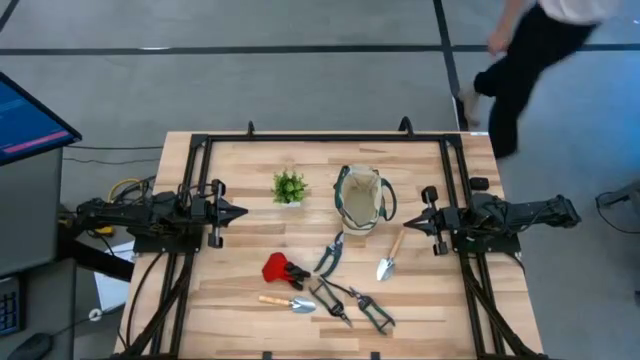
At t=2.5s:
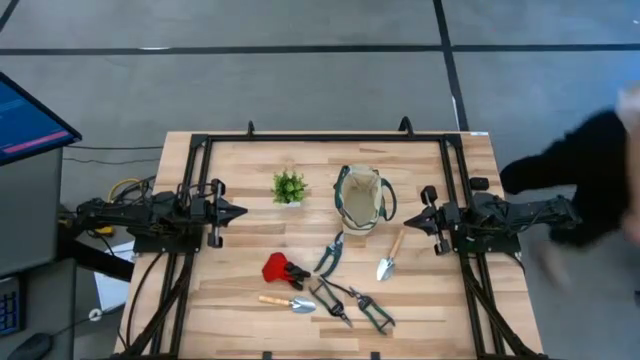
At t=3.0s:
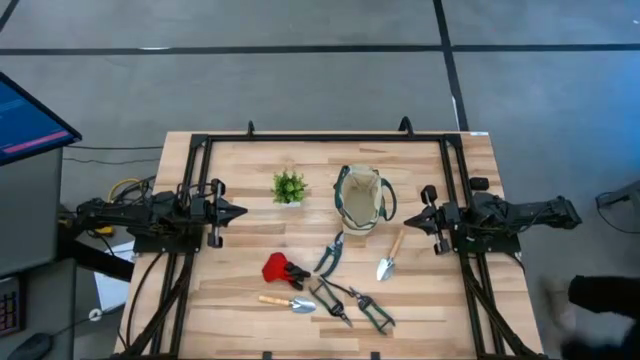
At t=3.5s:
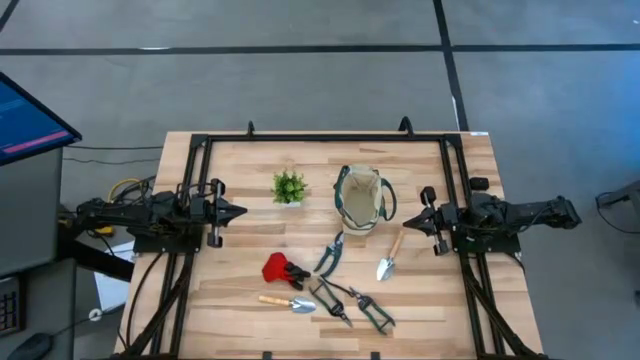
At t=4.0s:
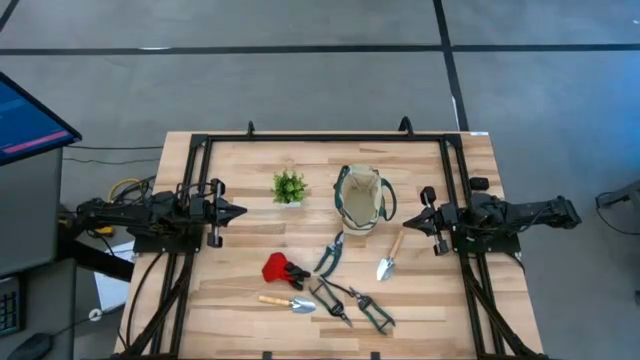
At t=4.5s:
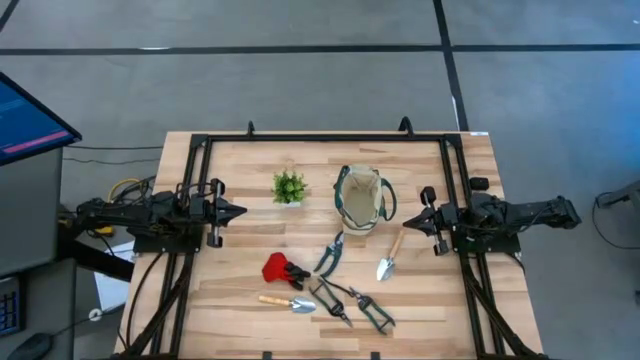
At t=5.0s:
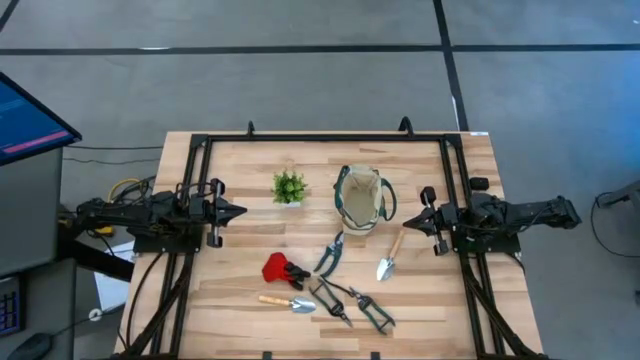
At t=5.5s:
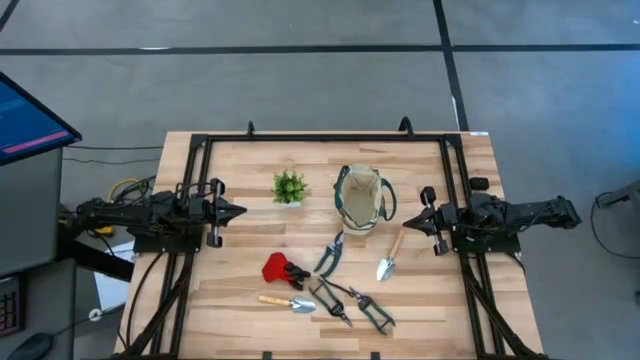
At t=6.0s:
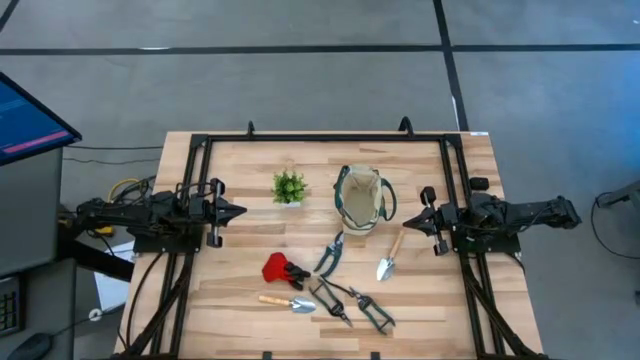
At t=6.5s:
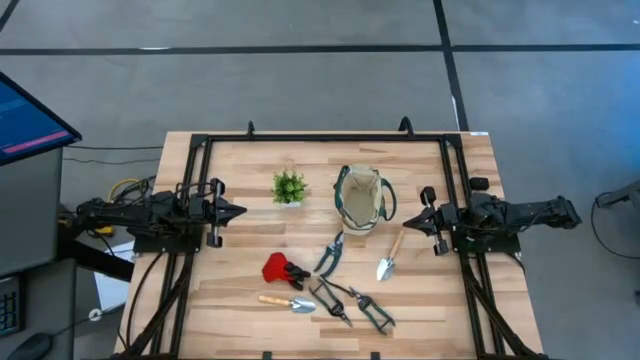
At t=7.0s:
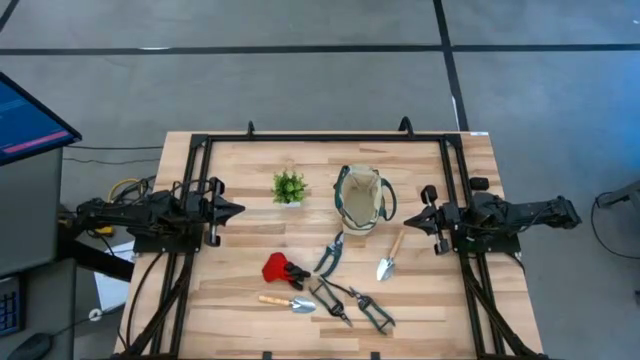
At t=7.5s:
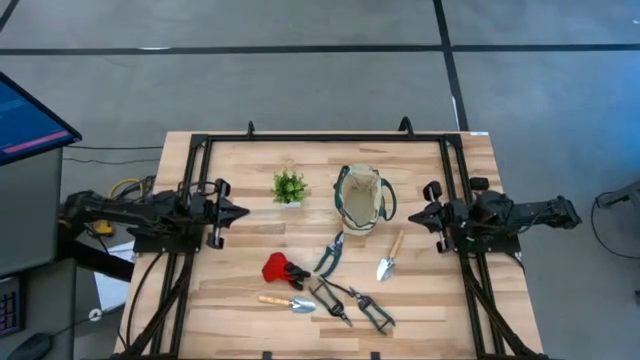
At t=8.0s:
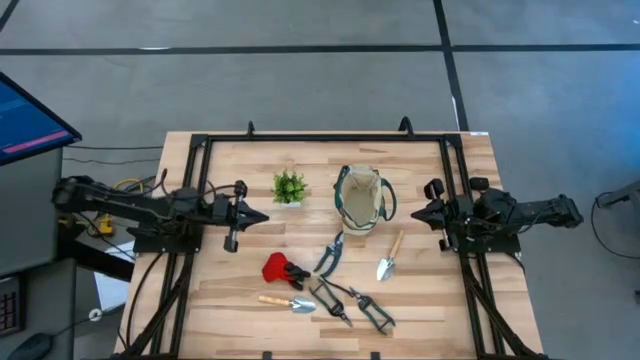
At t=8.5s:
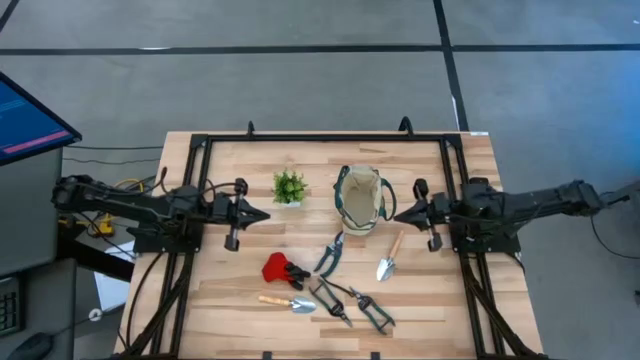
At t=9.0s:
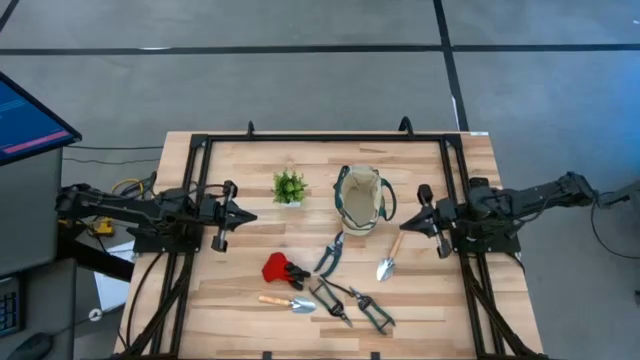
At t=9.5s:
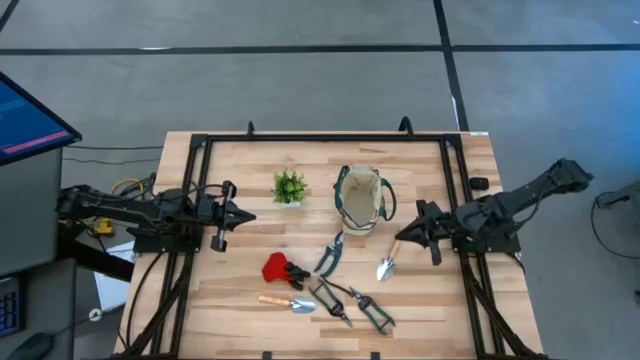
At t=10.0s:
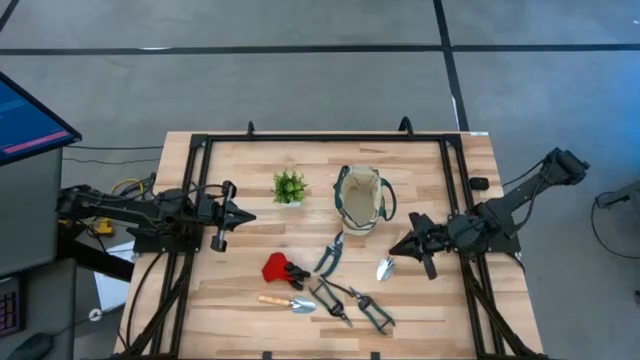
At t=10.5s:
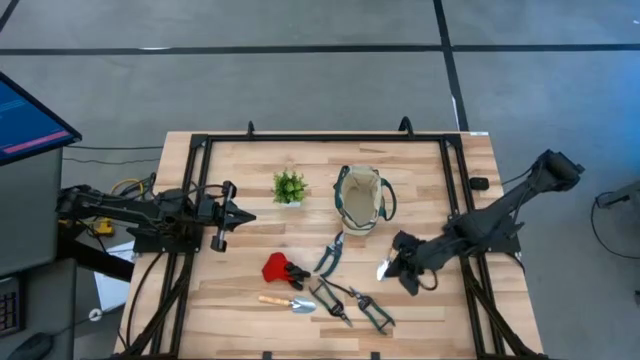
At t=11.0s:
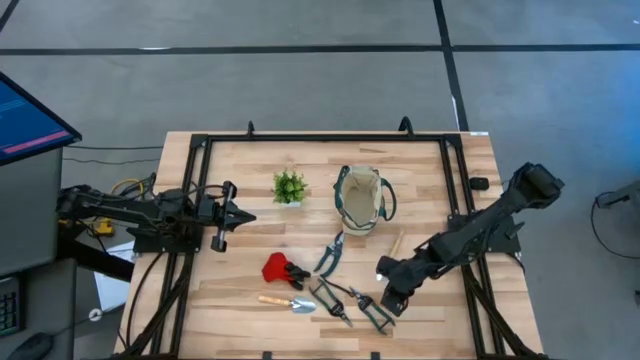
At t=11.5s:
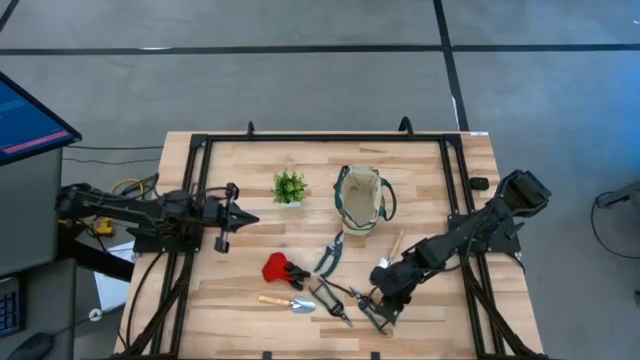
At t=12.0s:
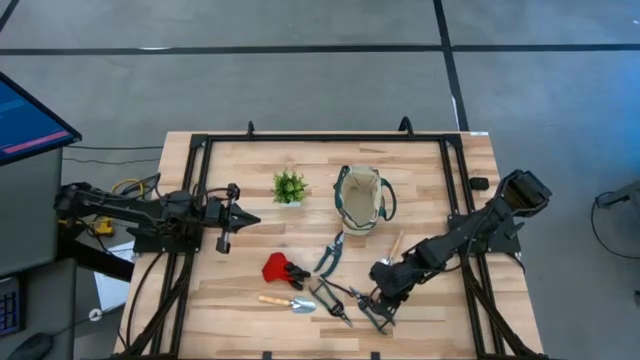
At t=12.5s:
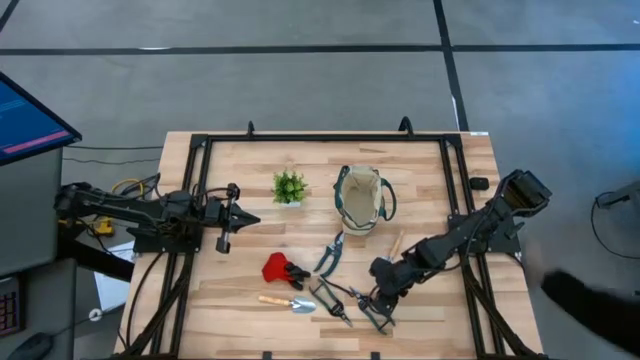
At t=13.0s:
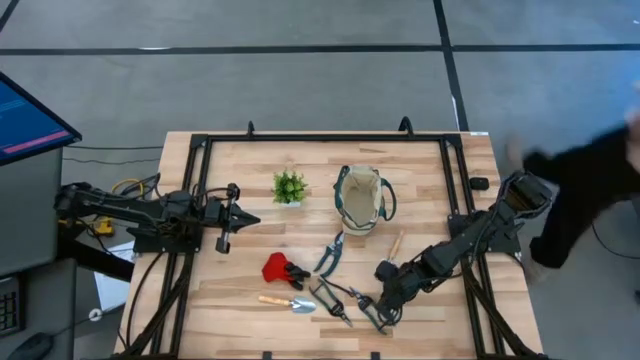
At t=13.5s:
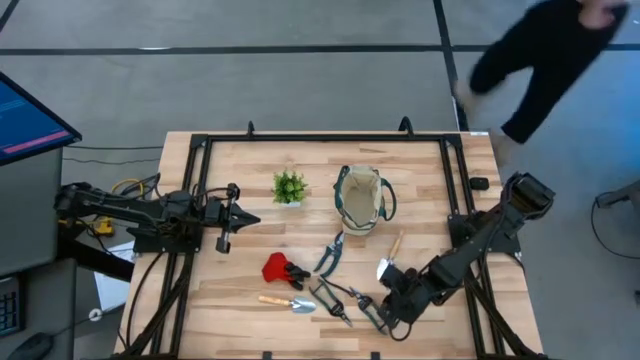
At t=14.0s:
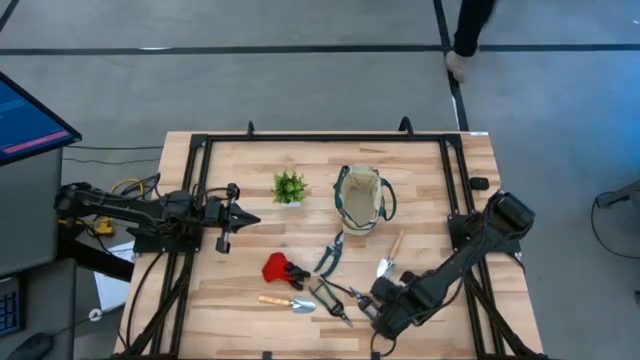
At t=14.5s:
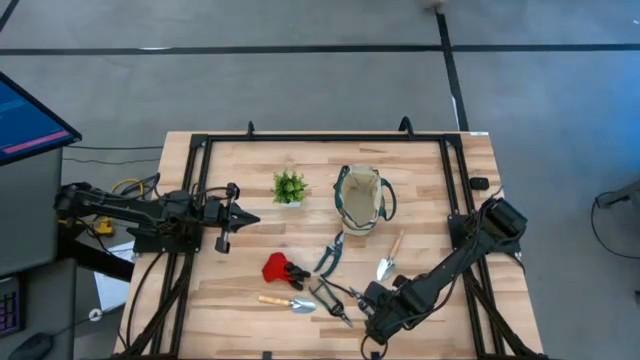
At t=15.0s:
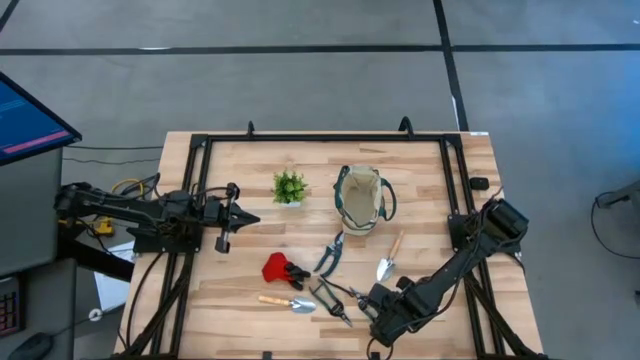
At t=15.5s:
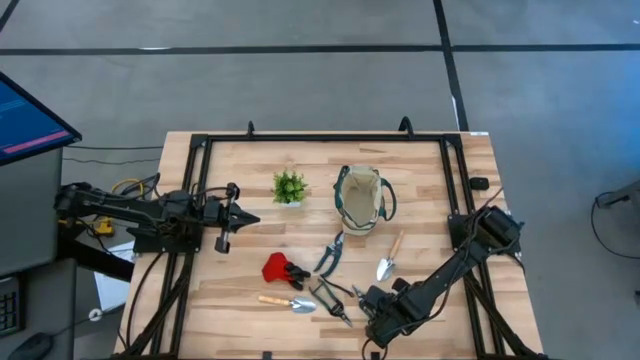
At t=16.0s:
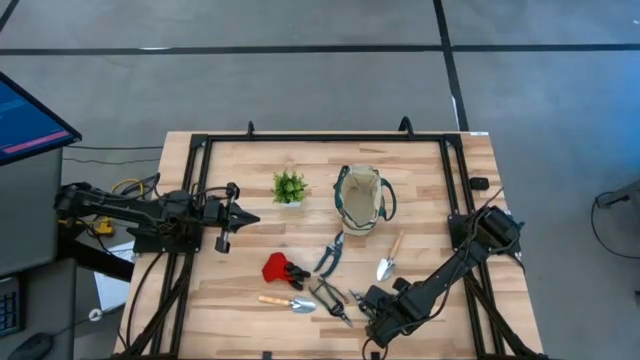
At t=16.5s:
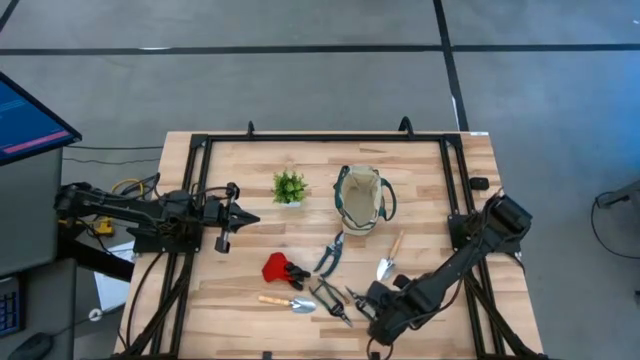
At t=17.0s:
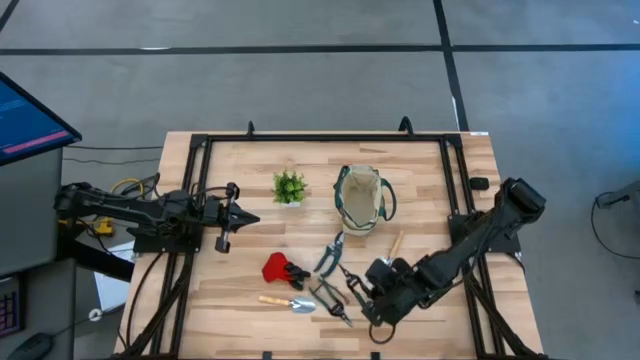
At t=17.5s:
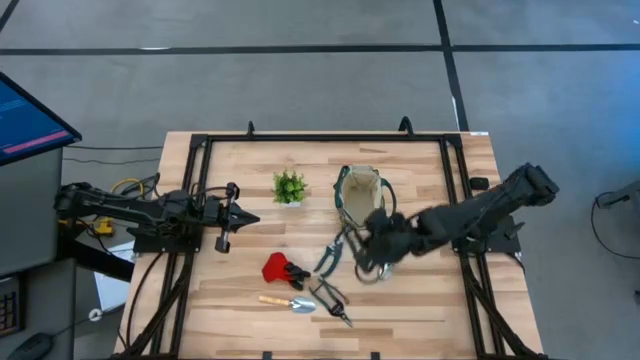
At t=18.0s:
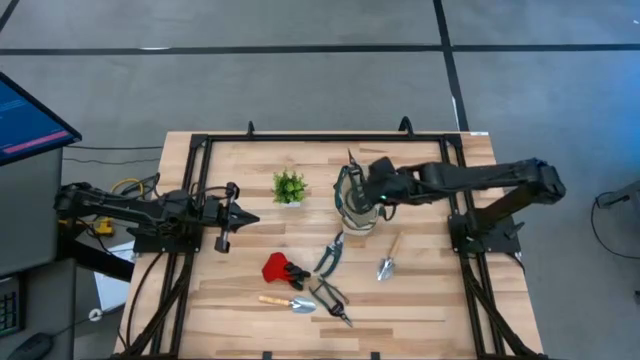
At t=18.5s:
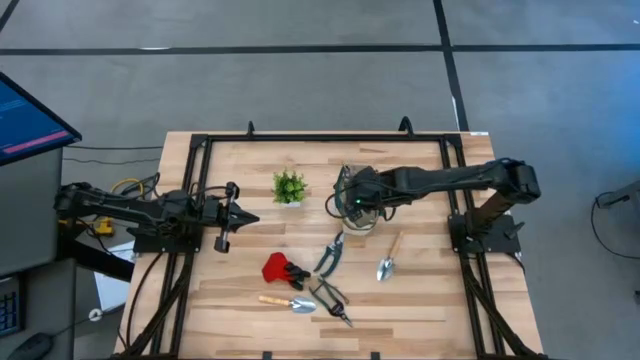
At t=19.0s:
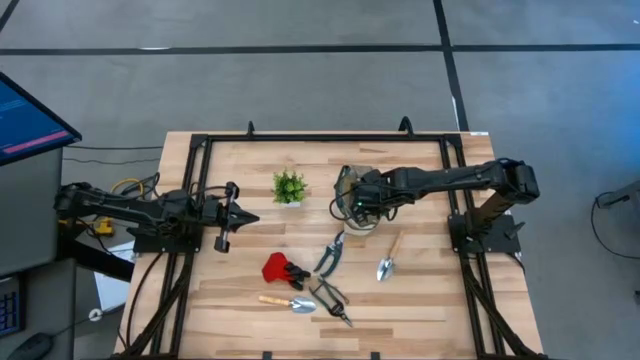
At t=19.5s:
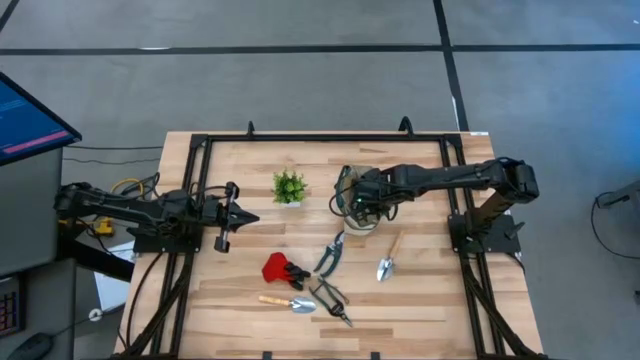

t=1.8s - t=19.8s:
Task: Pick & Place Garden tools in Gardening bag
Put the right green fruit pruner into the white gardening bag

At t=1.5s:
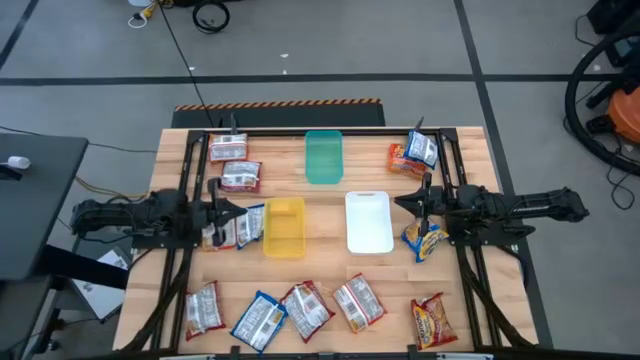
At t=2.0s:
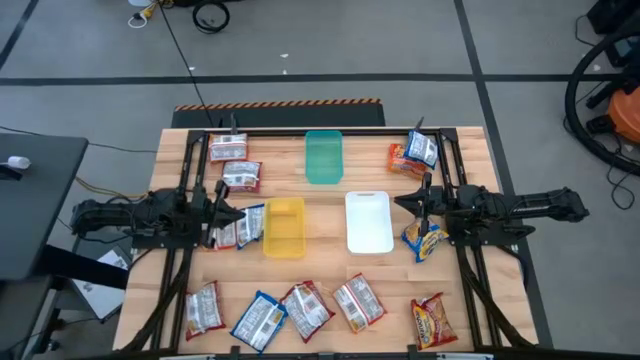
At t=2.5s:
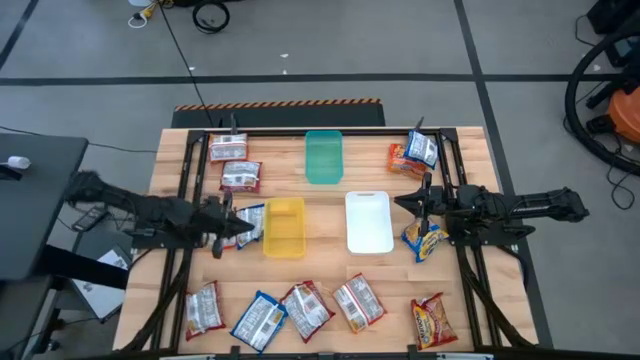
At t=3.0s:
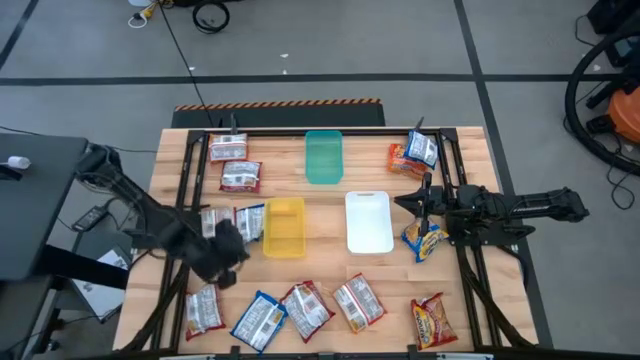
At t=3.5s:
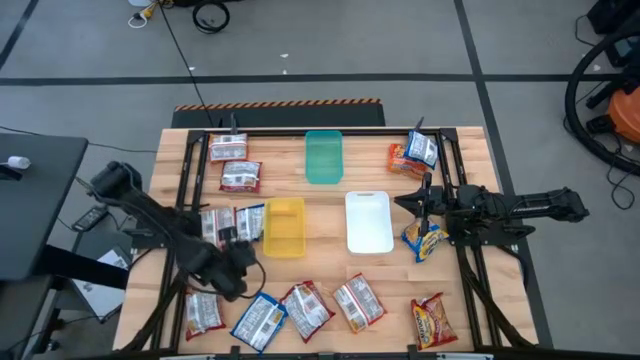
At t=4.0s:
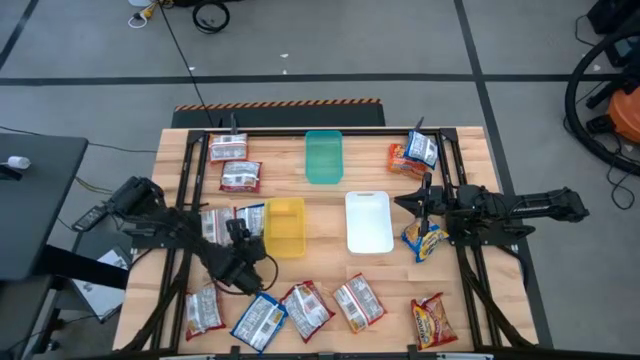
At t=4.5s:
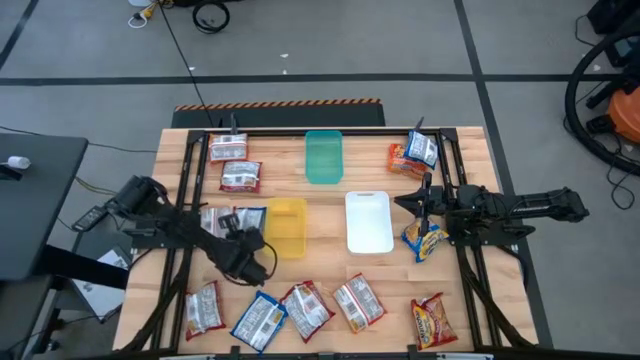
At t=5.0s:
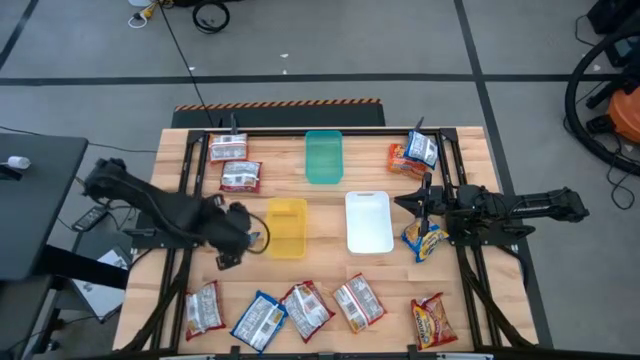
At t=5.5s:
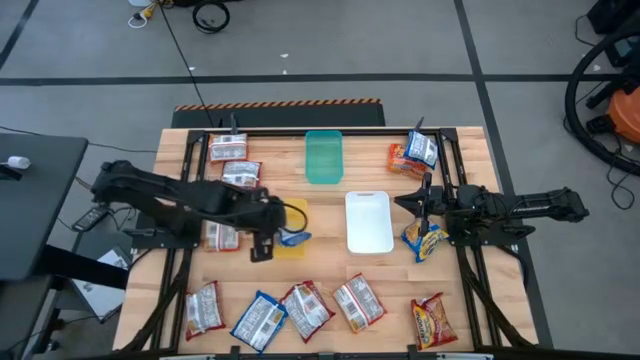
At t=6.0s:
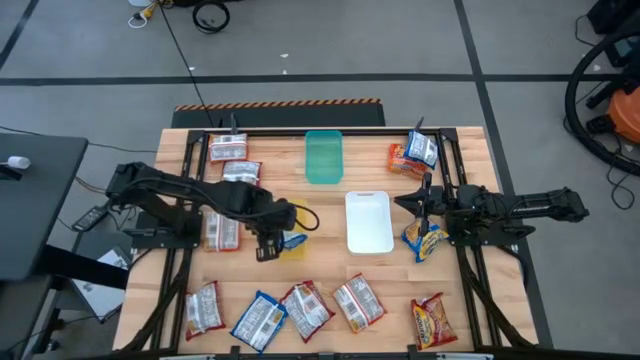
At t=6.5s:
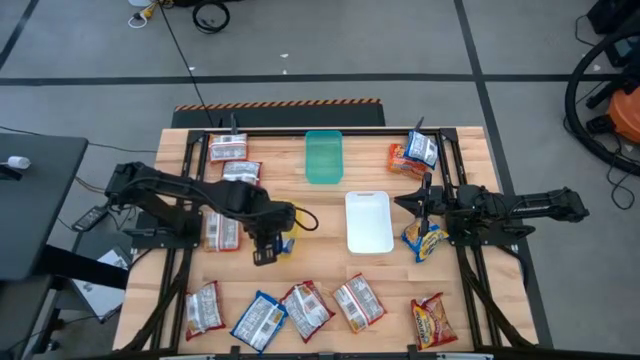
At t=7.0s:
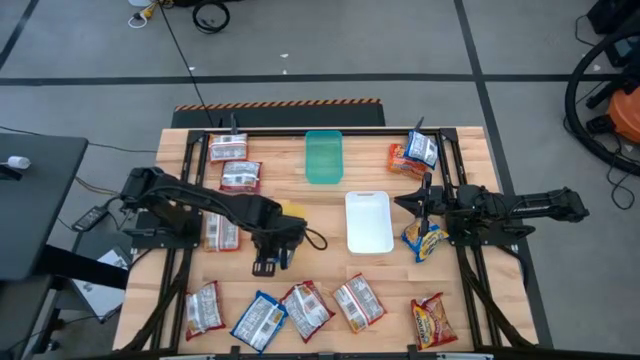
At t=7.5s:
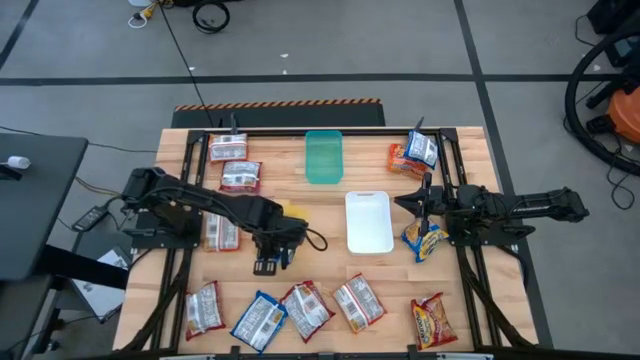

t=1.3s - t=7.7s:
Task: Sort Maruchan noodles
Put the top left blue noodle pack into the yellow bin
